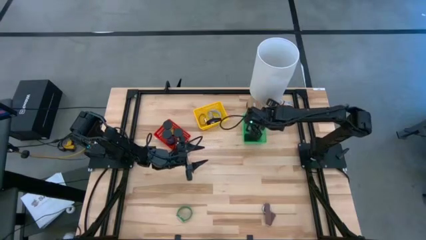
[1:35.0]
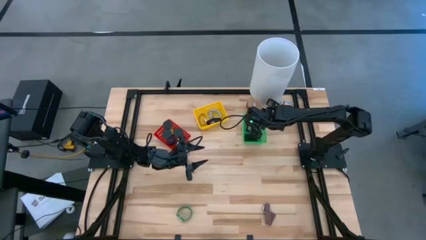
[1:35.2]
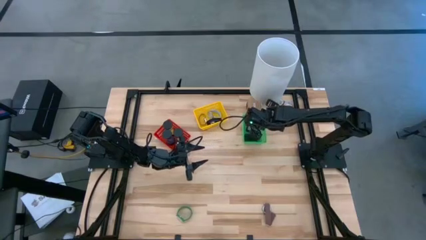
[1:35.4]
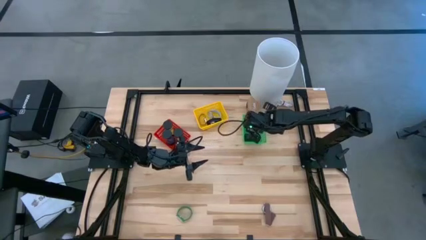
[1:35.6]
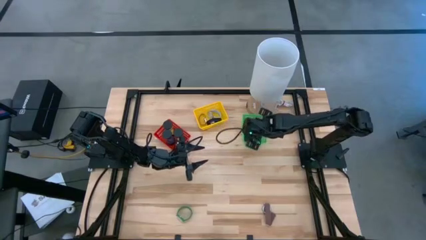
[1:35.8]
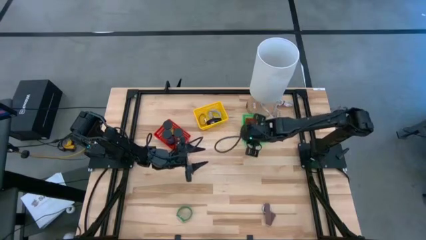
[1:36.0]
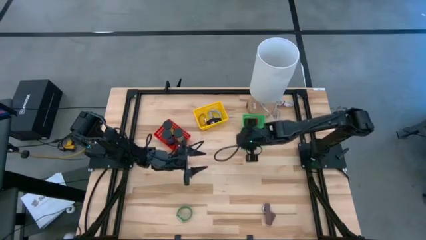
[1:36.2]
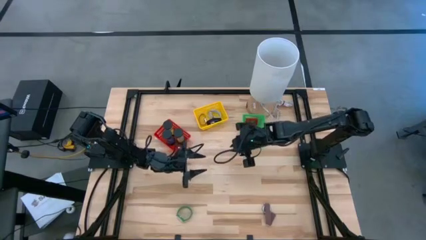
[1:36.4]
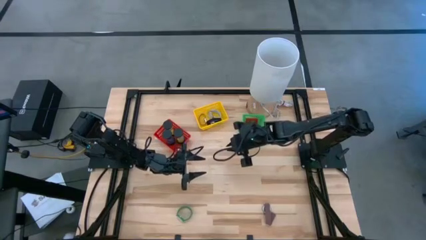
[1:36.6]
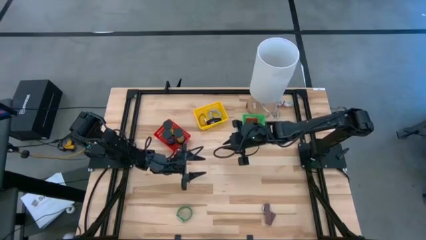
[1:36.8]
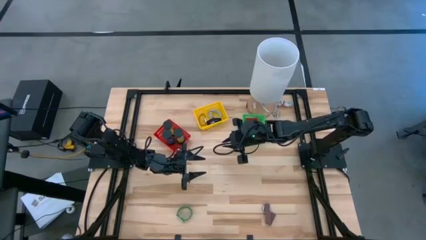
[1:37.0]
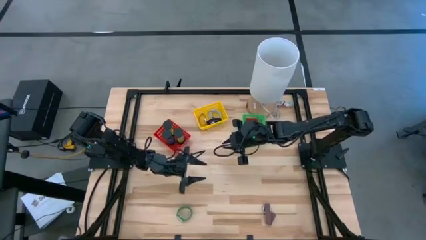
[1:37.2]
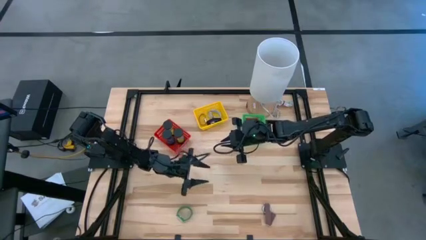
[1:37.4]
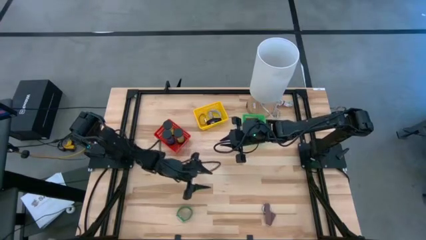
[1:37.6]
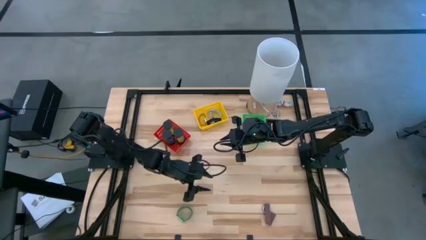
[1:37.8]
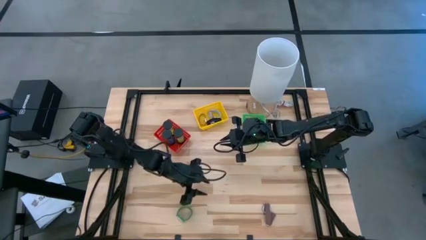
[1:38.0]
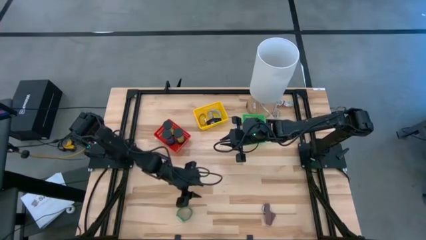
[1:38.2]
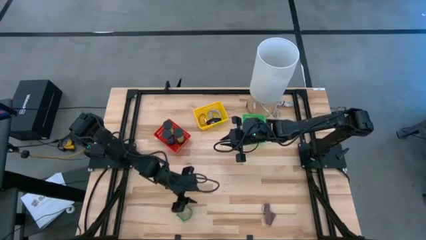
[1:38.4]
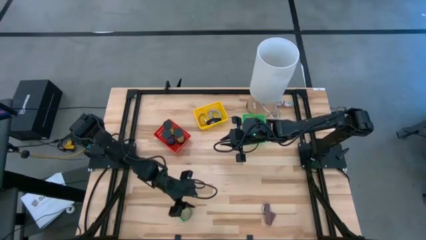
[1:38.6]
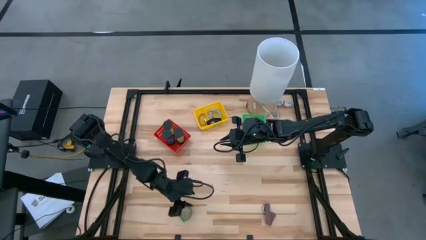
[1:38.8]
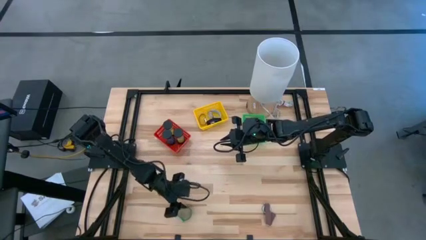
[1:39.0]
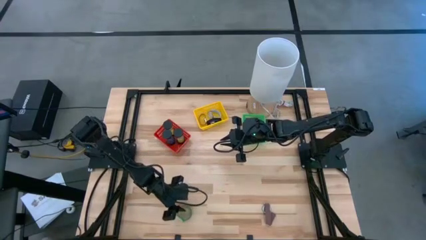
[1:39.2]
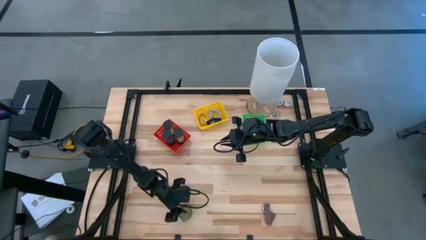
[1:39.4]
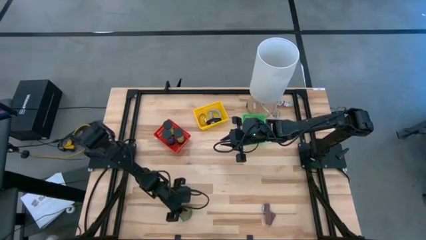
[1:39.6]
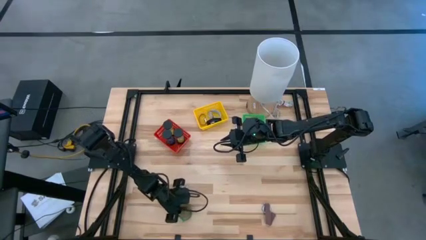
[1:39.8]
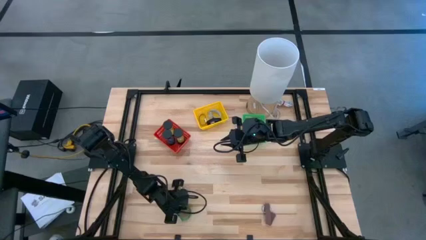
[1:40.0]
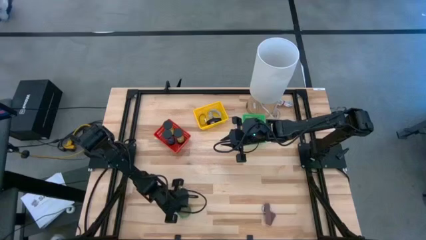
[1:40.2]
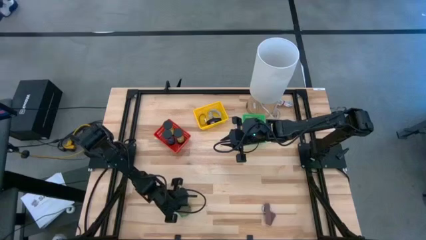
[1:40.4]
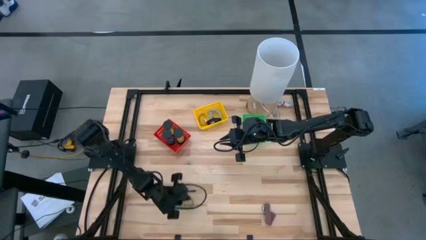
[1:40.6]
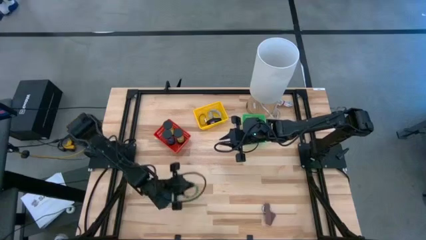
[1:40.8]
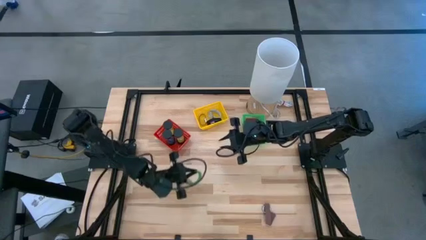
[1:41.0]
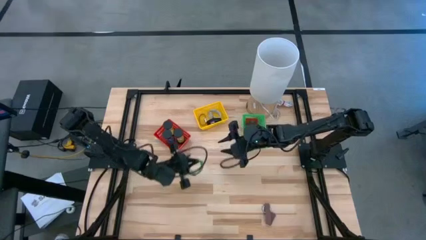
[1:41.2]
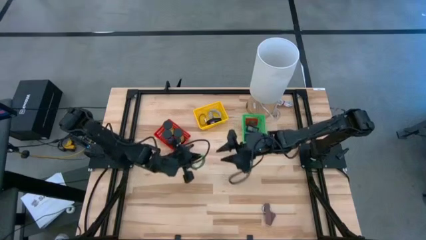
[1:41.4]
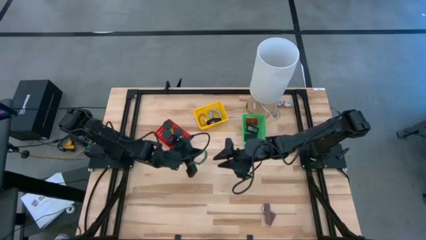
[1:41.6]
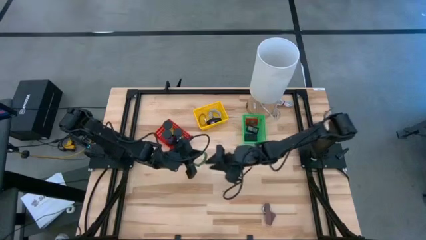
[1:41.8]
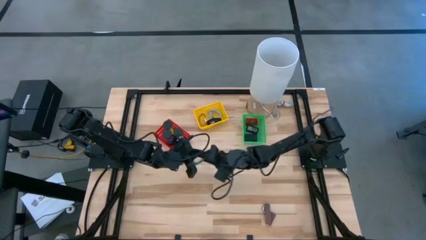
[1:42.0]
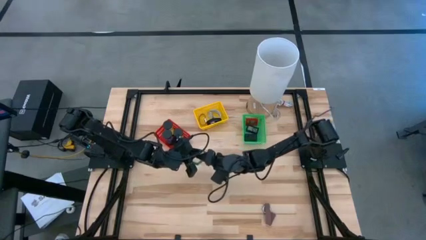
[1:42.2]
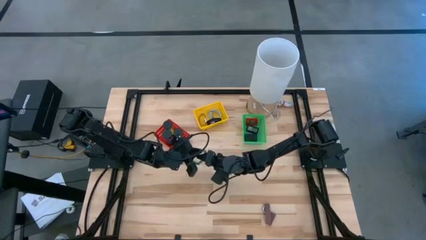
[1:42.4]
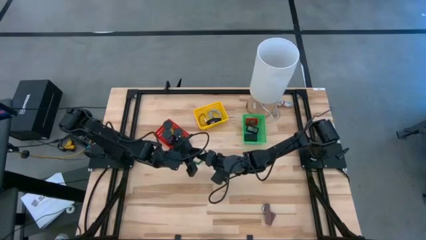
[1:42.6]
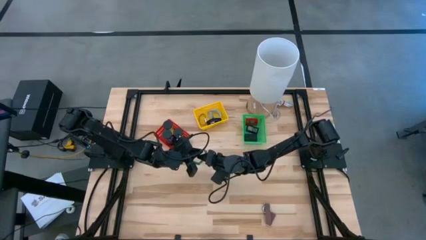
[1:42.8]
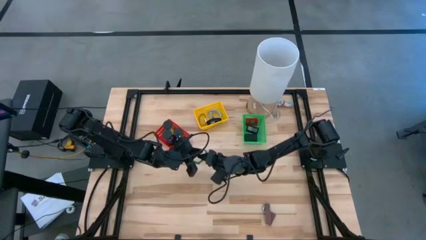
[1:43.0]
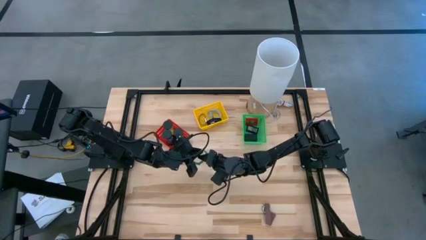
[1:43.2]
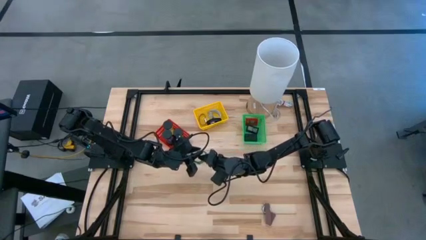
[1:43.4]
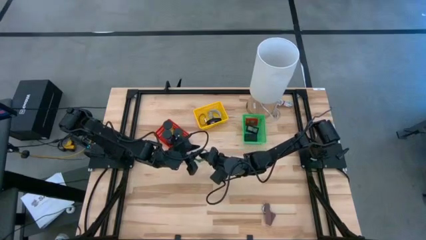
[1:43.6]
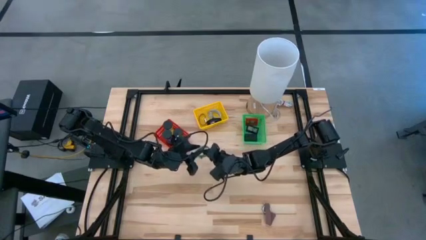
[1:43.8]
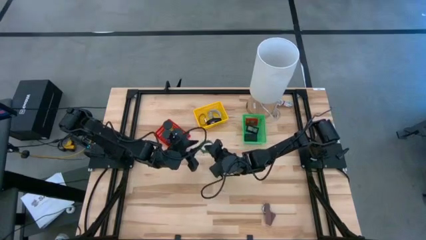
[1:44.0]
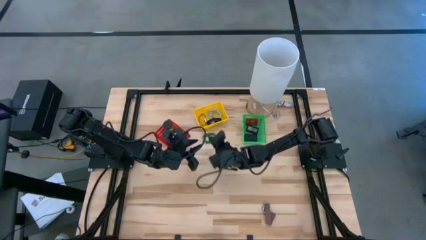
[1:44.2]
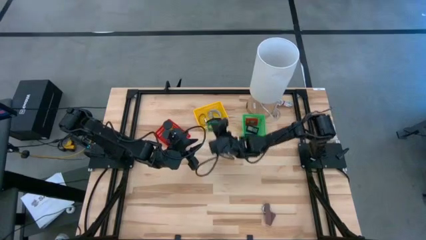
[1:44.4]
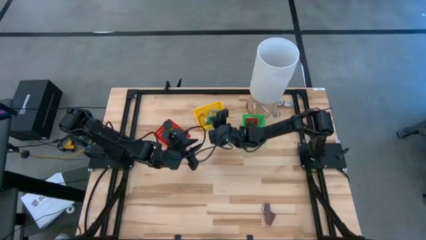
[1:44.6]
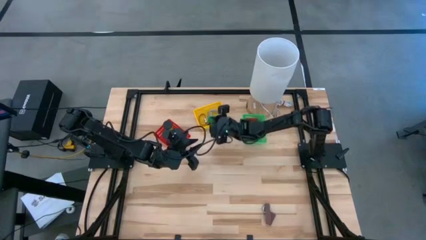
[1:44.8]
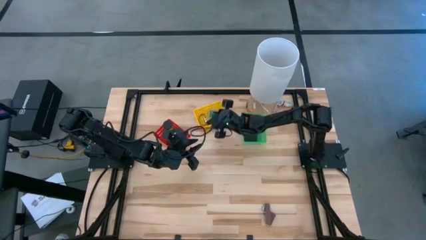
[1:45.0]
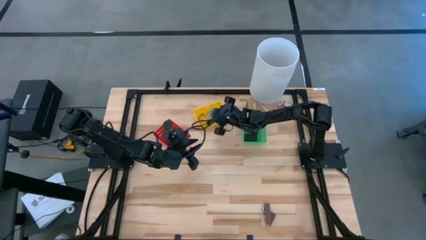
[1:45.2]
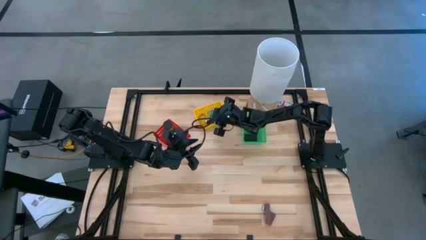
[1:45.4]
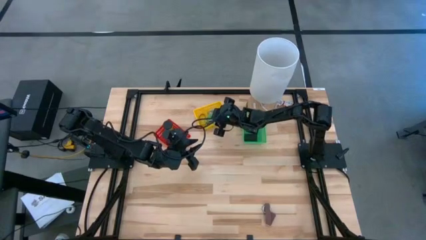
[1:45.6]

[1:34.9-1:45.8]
Task: Pick & Place Office items
Put the green watch into the yellow basket

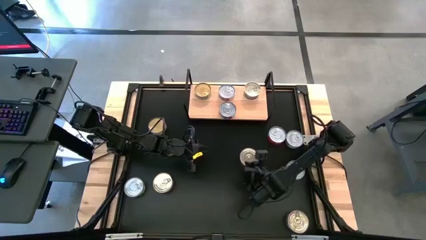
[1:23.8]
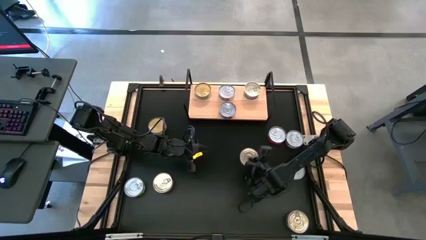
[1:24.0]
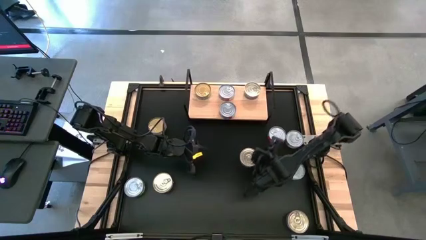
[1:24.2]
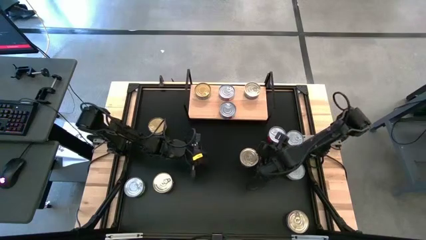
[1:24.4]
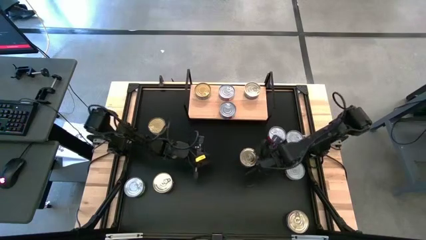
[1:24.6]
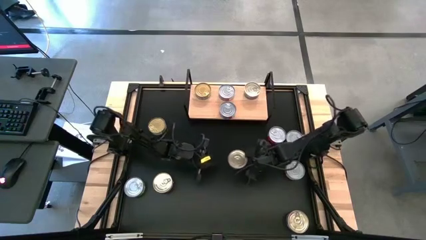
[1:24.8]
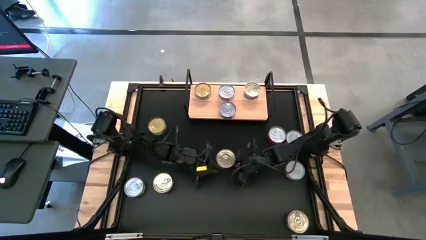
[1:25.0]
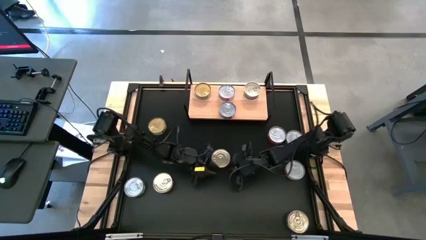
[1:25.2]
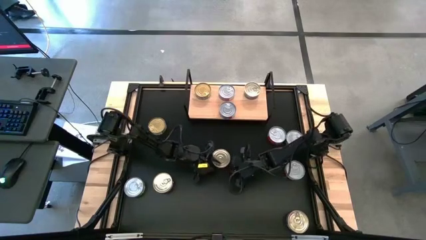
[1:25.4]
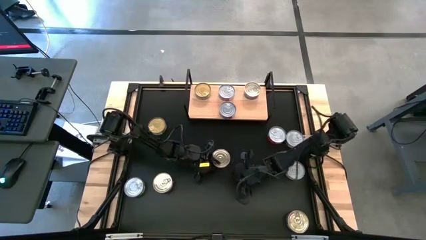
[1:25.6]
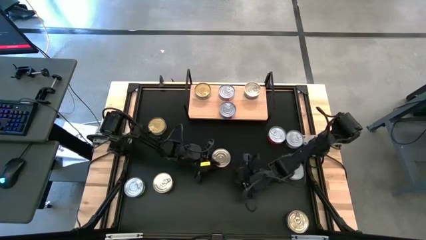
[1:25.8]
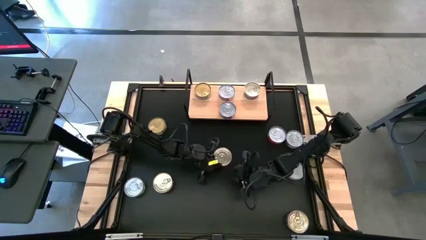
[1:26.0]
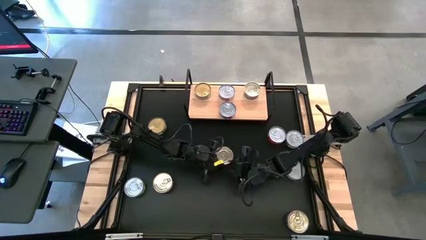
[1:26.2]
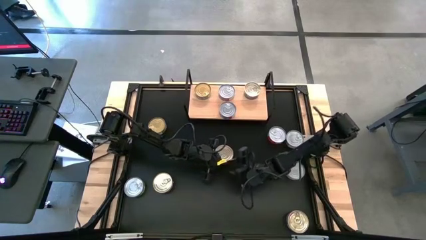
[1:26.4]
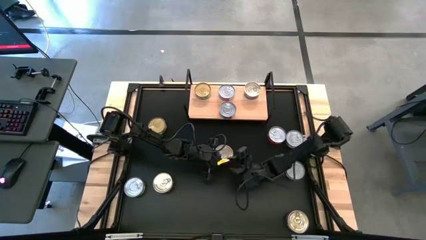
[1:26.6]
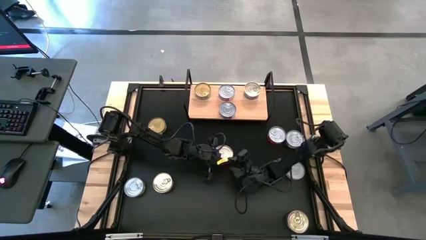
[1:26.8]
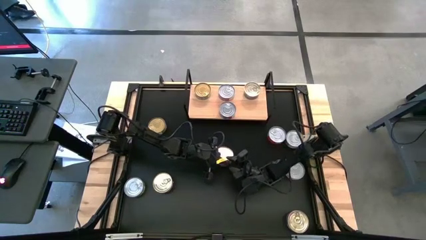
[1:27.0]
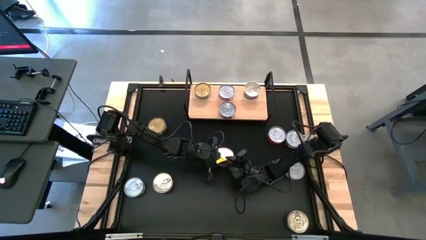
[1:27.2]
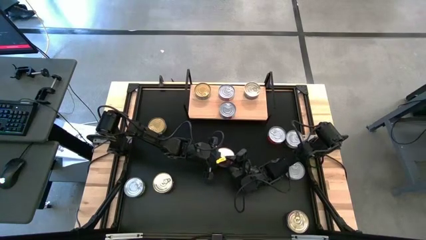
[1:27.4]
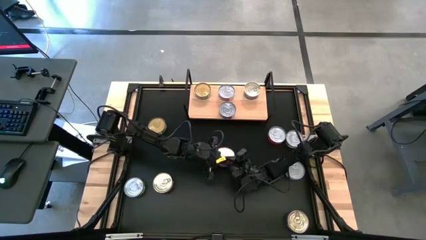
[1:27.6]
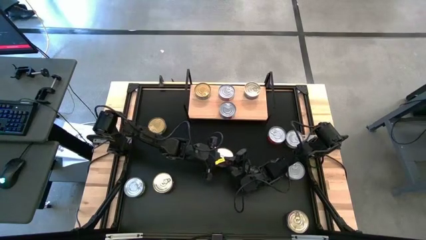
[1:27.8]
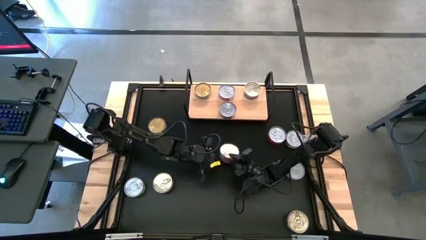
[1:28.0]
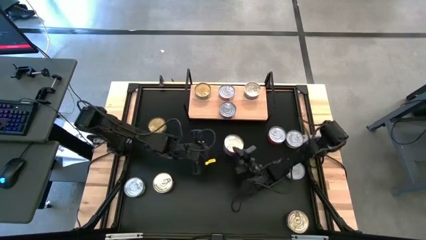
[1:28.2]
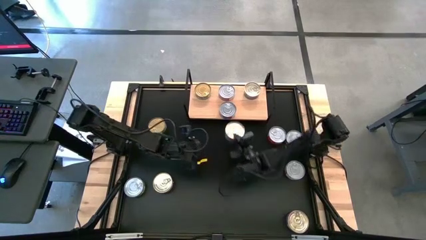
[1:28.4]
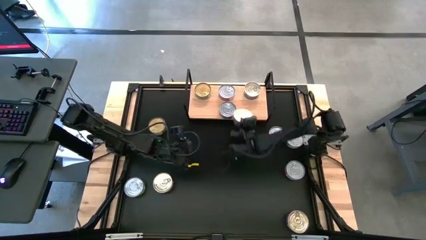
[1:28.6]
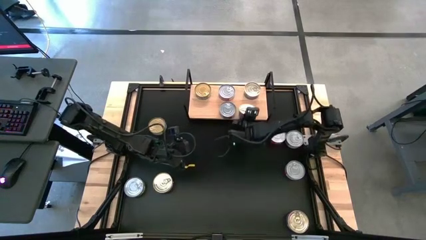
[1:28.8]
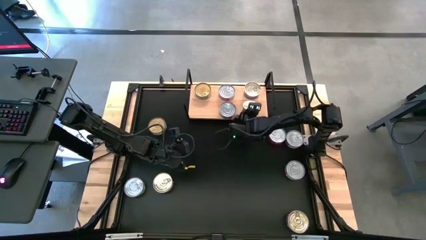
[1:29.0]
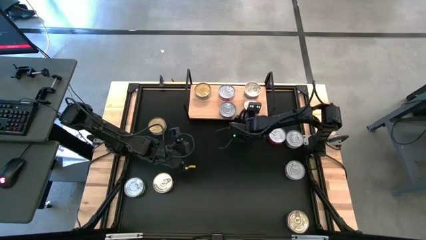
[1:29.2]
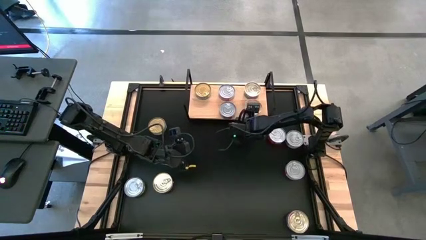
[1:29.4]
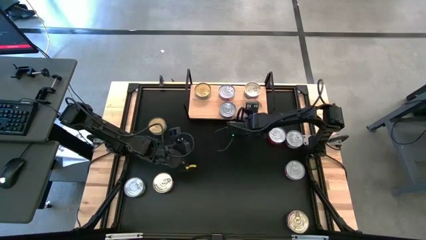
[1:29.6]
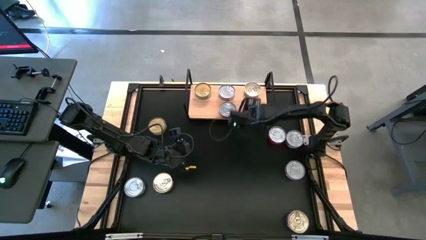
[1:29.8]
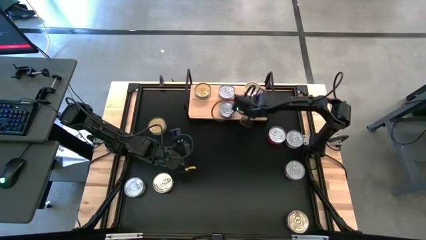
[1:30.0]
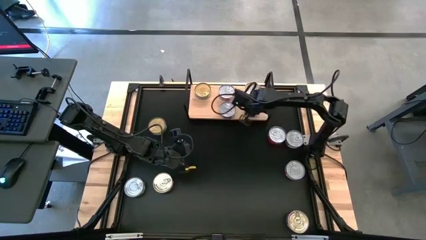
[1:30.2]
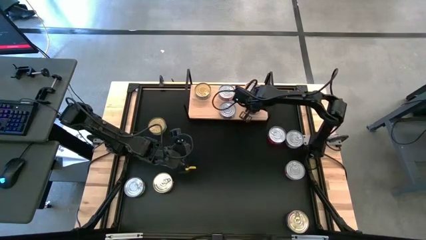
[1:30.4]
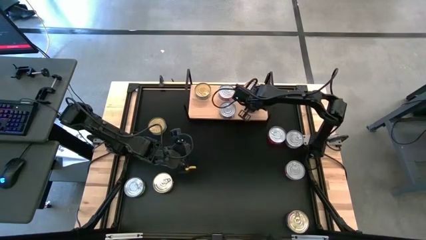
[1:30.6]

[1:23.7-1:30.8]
Task: Stack canned seafood by type on shelf
Align the blue tuna can with the other blue tuna can on the shelf
